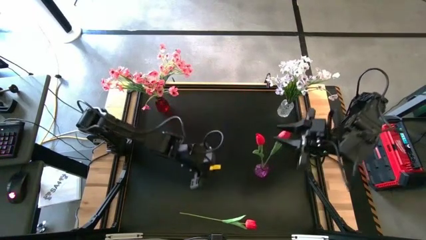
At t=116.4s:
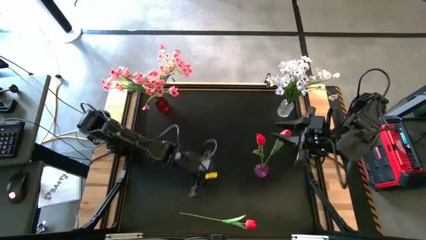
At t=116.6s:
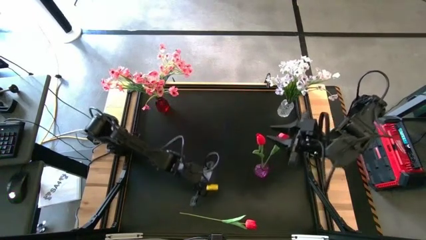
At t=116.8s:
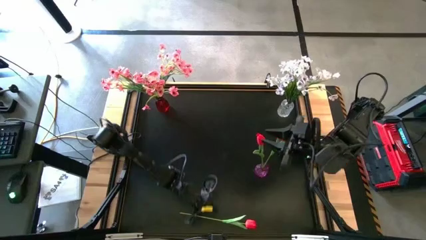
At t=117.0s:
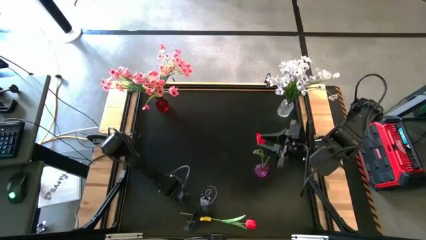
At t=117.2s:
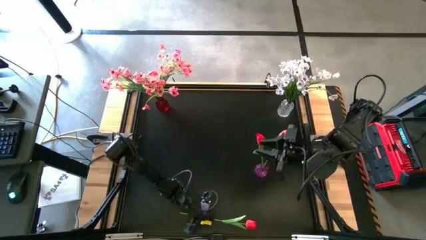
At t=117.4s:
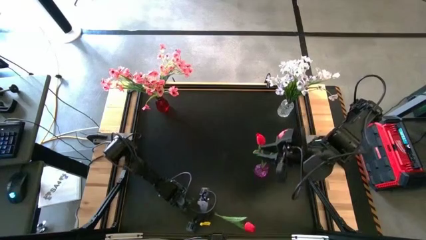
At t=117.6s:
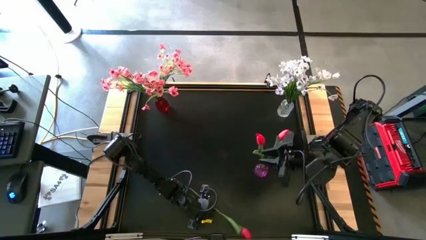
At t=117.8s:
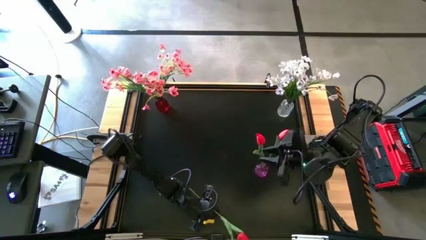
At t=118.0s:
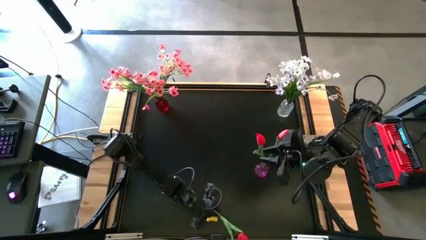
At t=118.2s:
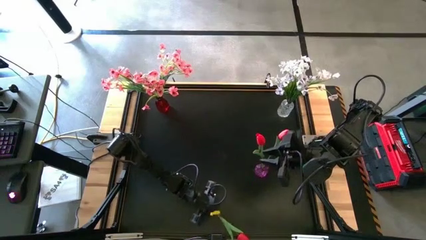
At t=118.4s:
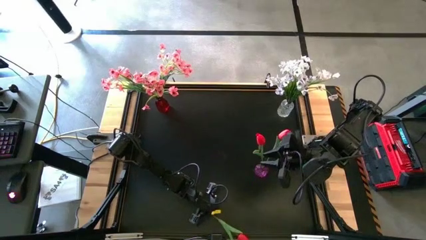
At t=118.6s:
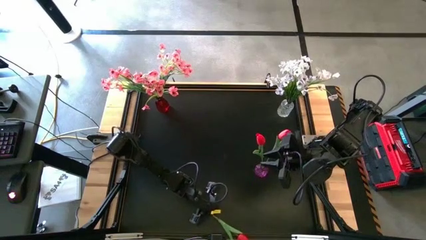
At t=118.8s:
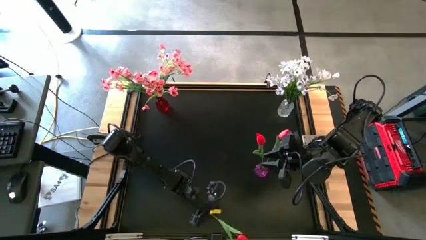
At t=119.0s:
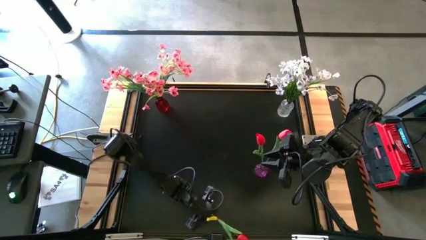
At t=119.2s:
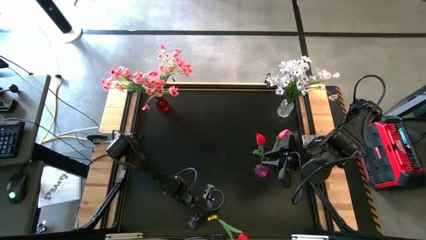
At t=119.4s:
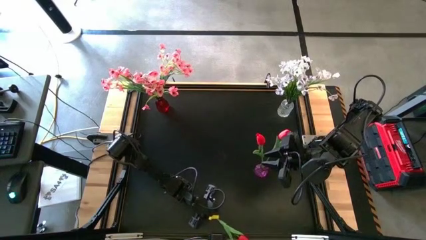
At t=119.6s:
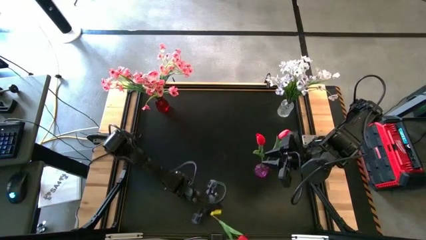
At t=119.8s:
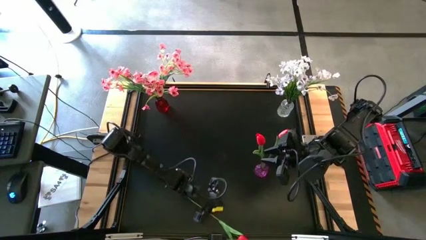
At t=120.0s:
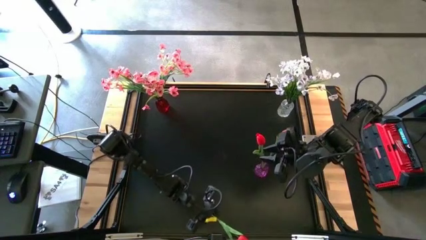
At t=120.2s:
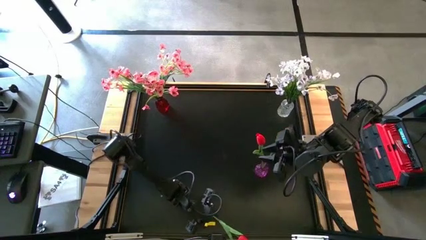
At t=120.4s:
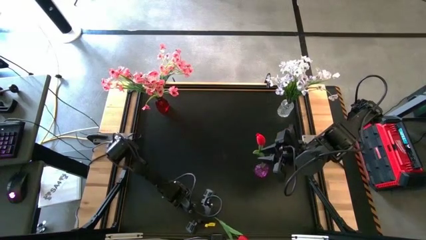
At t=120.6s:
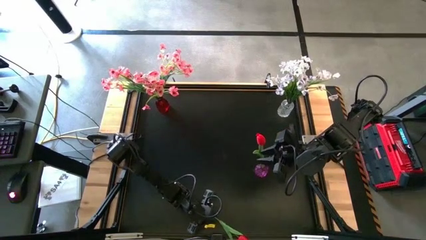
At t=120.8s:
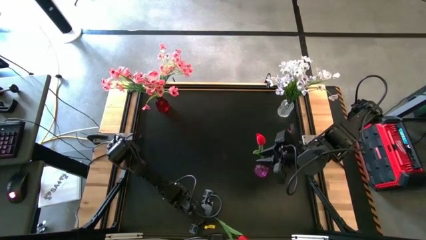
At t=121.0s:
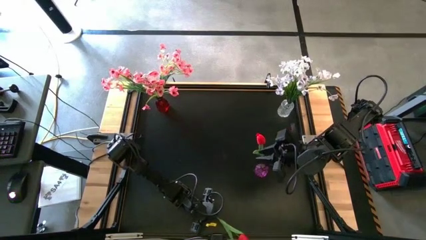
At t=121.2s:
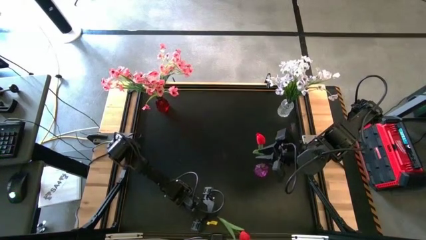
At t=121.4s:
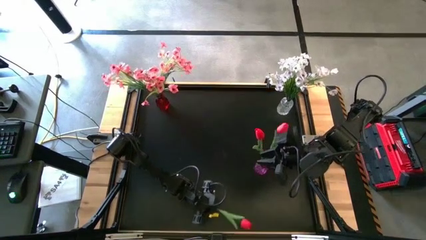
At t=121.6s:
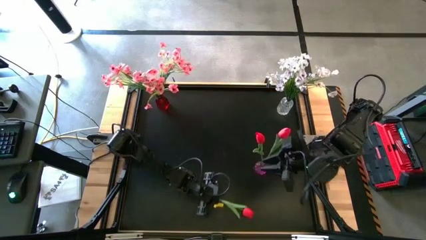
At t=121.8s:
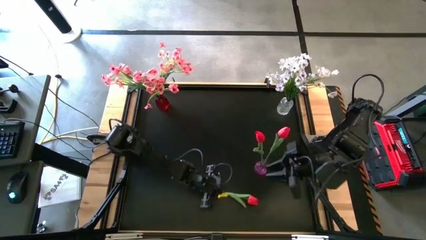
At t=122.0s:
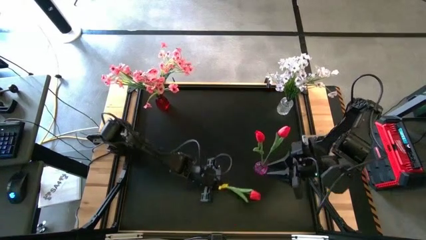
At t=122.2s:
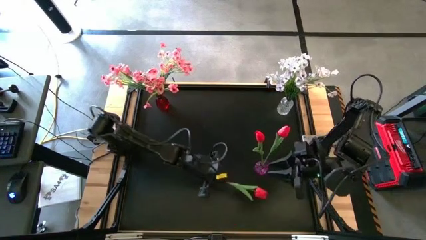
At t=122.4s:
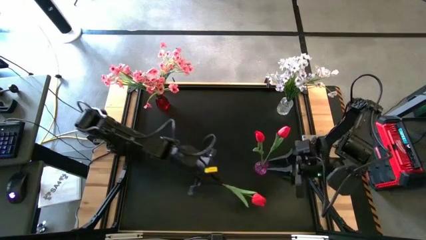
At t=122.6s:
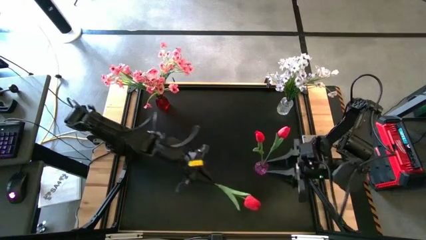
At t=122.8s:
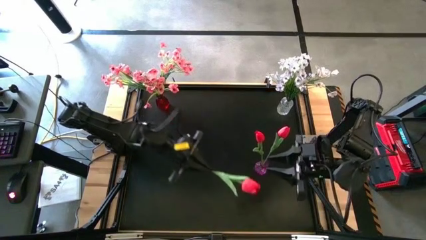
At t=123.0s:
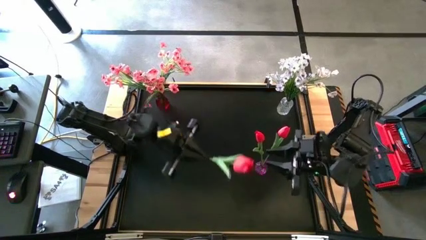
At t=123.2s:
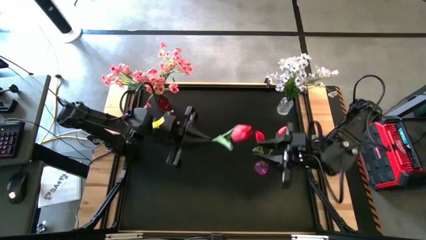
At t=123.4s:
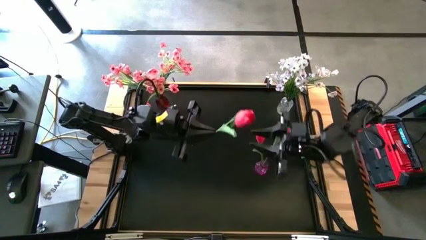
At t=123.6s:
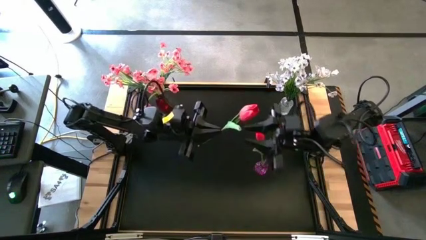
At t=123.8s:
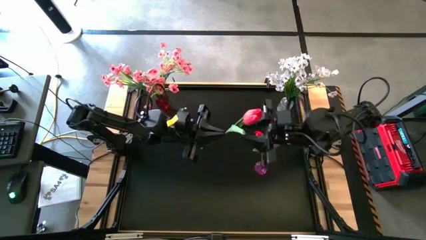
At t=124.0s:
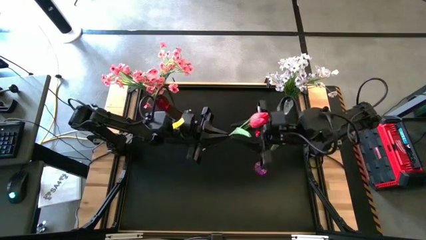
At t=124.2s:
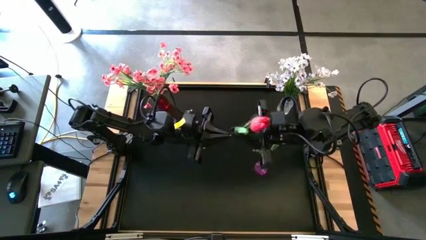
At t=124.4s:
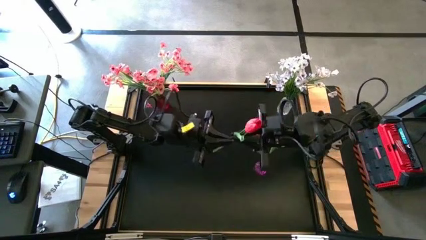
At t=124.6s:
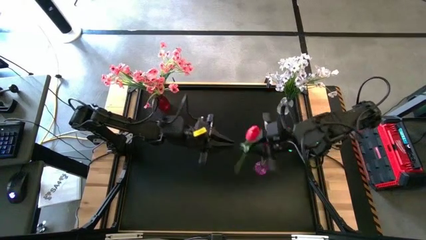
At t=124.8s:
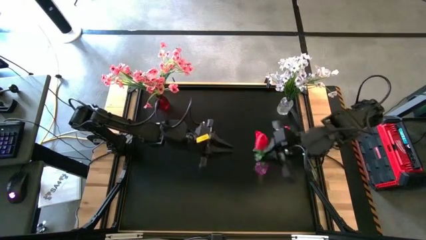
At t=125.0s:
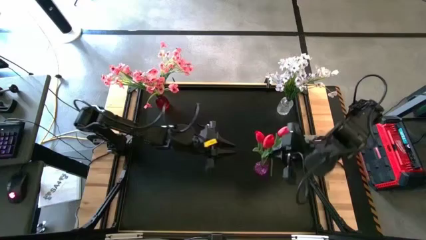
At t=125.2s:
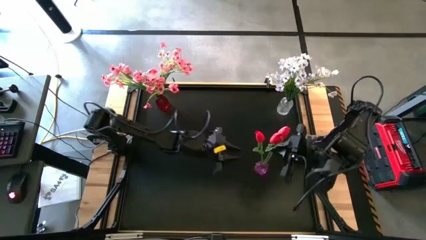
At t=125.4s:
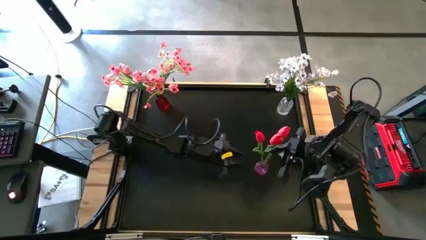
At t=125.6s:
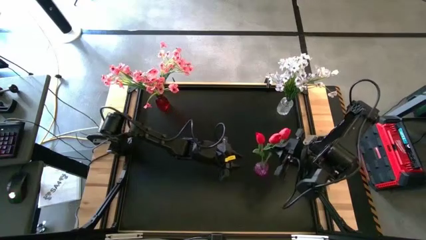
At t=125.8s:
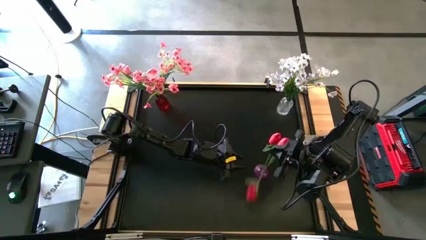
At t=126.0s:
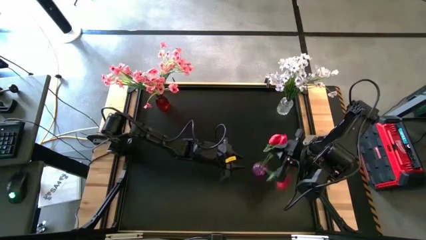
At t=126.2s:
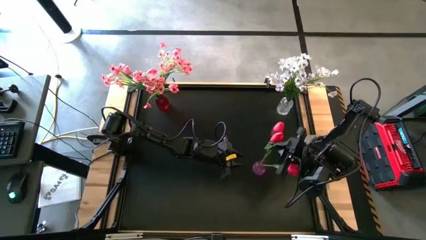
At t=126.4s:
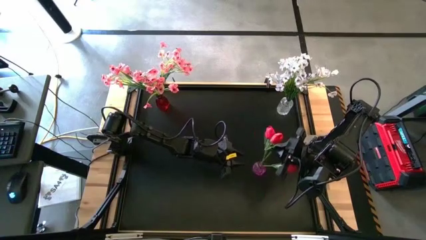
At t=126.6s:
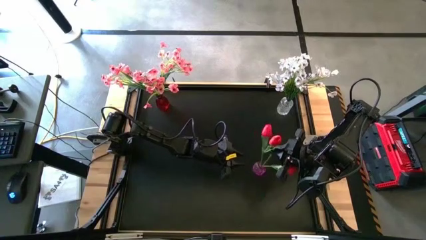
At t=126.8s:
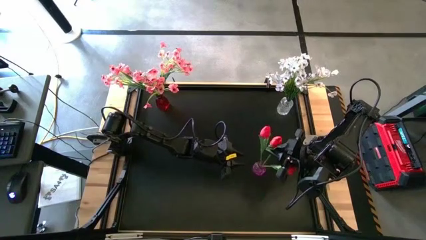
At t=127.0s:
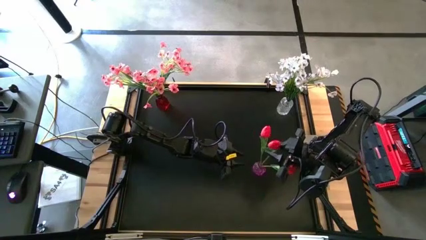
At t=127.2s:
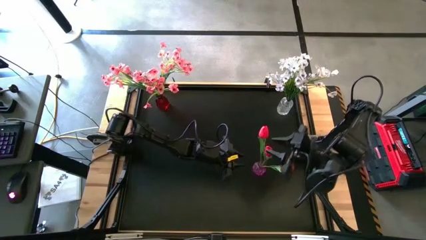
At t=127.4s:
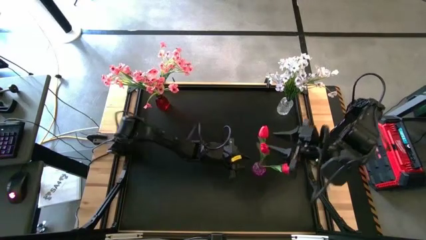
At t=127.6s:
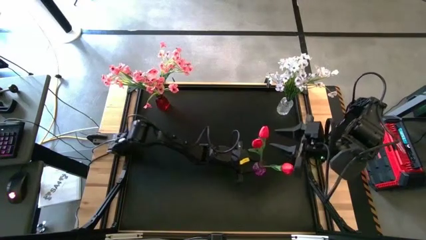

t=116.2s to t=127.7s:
Task: Sort flowers into vase by color
Put the red tulip into the purple flower vase
